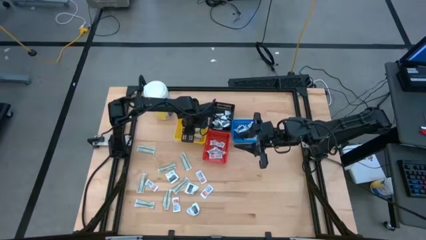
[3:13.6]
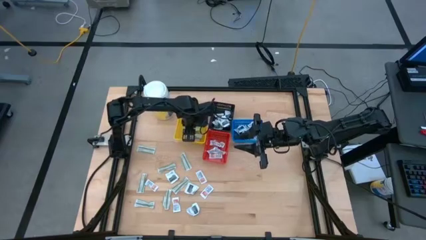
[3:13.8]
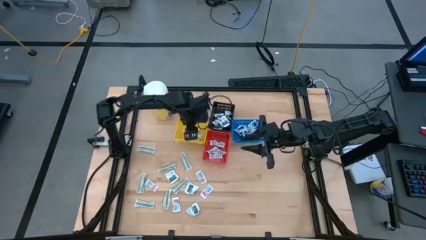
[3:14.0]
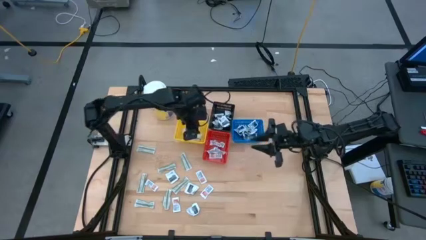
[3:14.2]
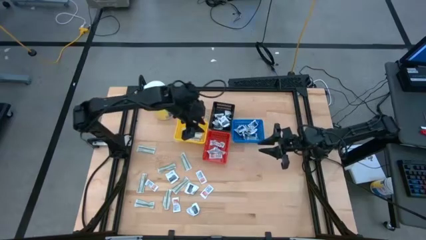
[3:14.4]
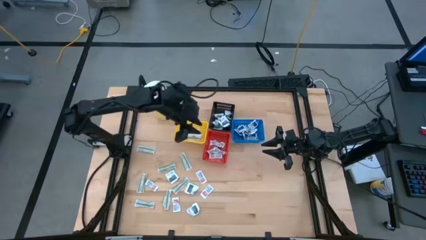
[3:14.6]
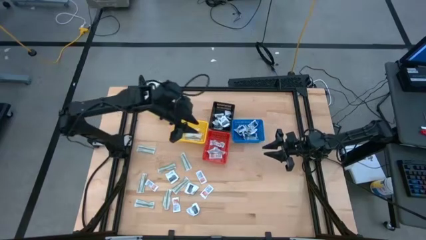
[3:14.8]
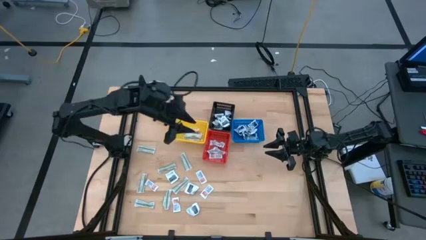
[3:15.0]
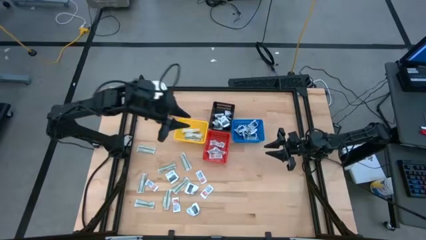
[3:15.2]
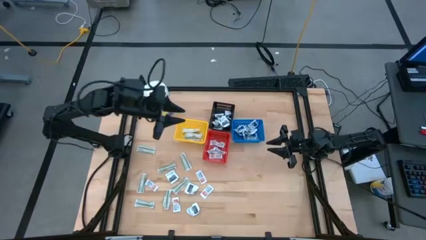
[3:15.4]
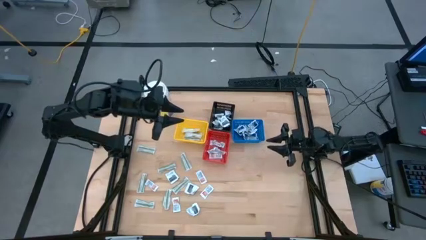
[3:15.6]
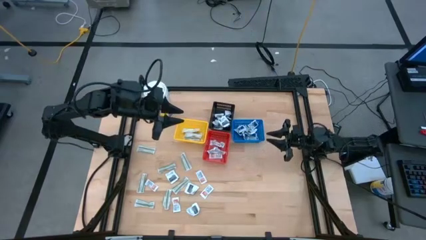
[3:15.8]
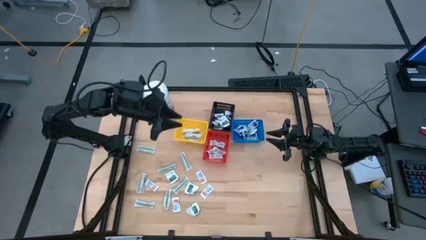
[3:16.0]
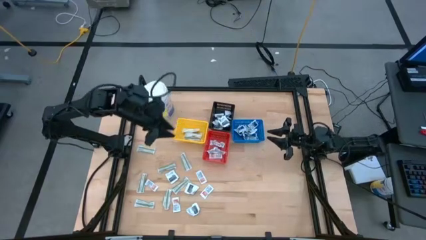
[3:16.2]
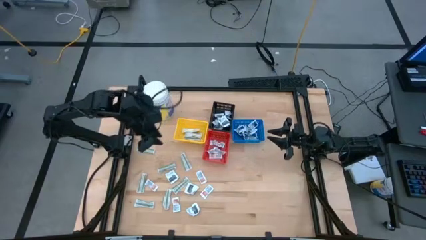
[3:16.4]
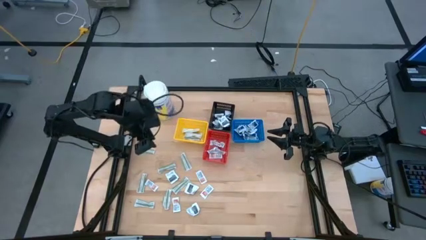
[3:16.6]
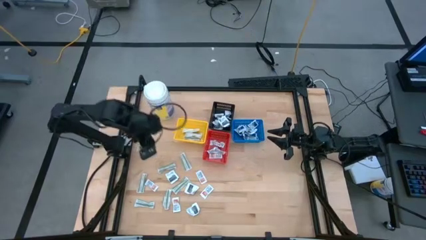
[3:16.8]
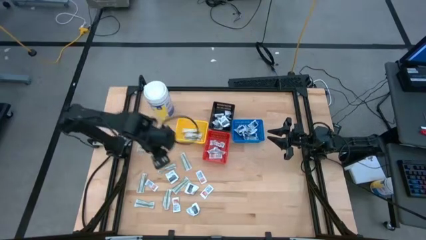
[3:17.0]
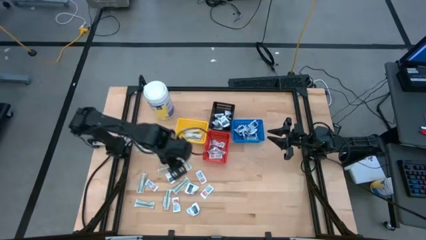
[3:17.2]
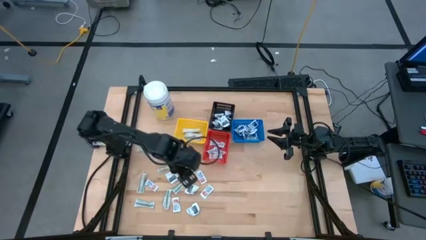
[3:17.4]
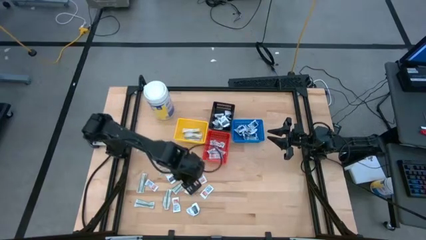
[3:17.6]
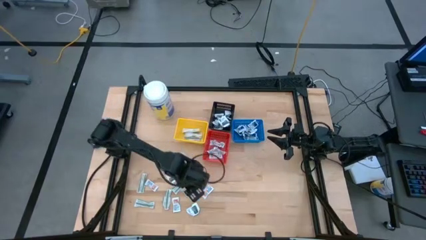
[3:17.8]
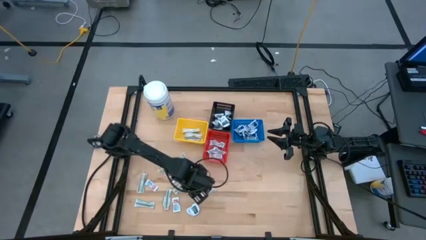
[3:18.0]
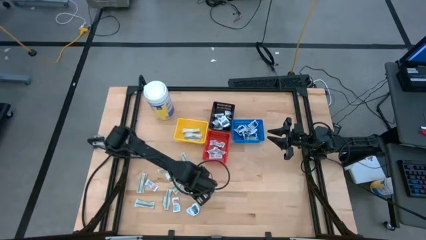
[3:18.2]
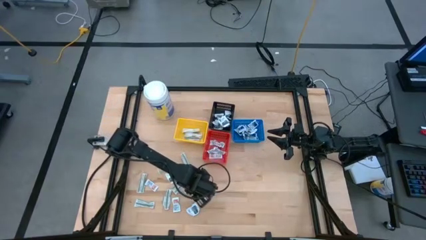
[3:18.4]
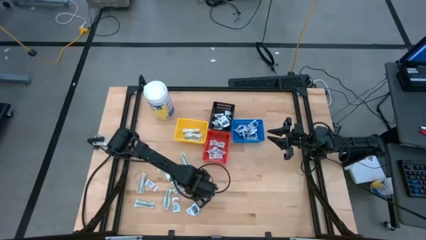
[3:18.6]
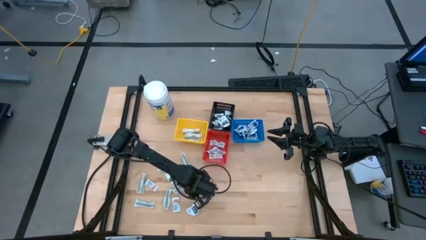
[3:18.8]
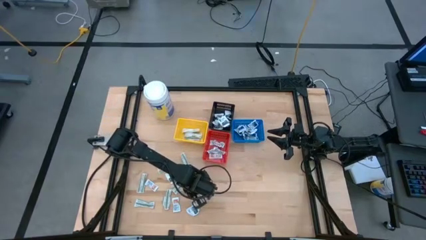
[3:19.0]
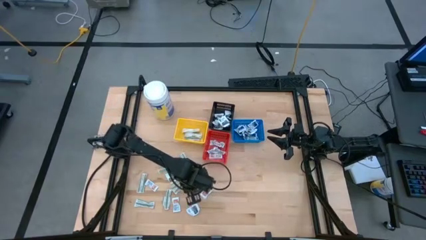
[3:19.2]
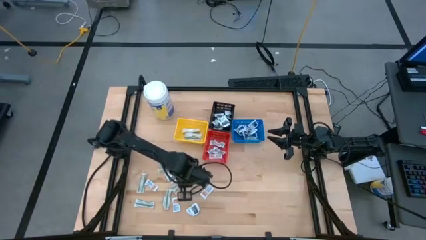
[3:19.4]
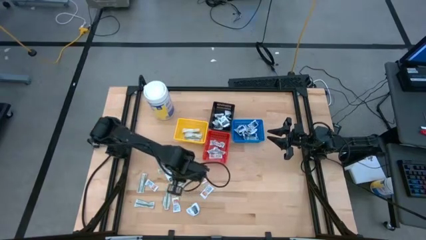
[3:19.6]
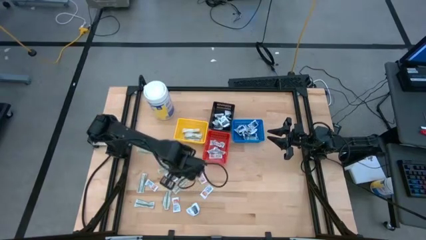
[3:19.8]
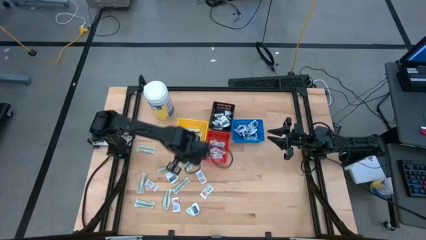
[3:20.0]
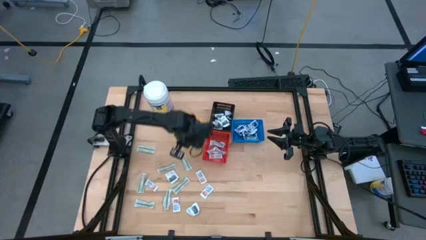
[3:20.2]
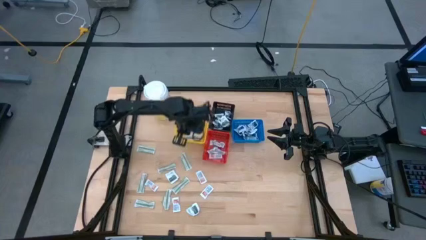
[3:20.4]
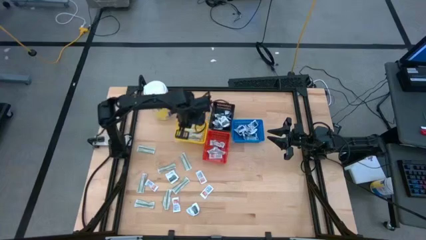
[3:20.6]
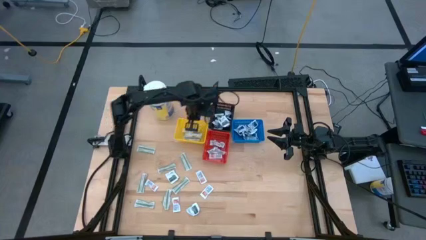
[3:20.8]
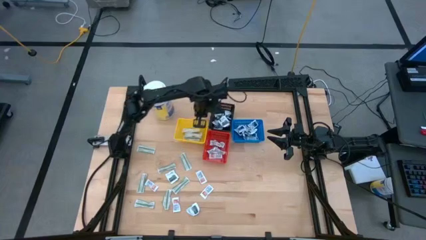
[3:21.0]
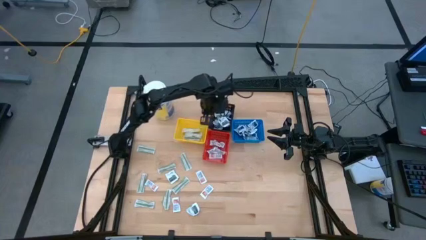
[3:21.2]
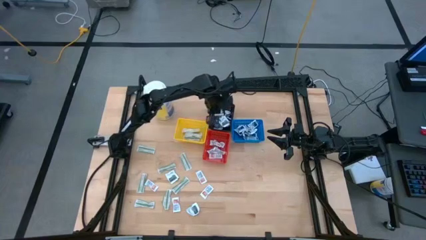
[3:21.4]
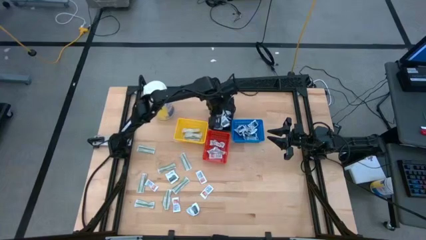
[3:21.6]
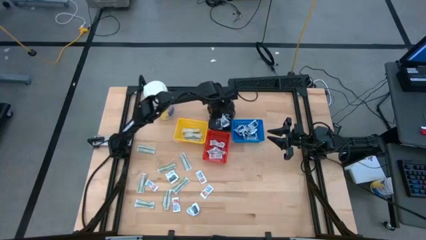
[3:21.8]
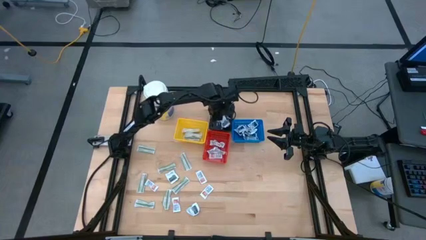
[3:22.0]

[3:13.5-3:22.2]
Task: Pick & Place First Aid Supplies
Put the towelette pack into the black bin

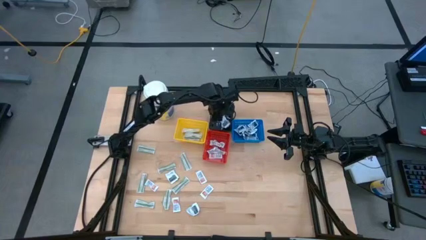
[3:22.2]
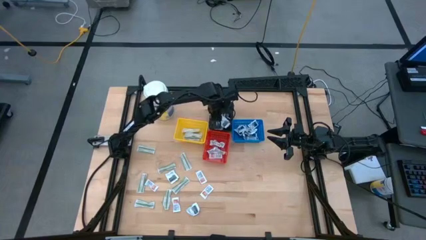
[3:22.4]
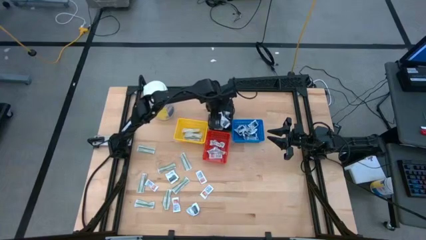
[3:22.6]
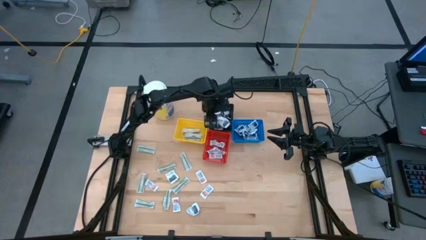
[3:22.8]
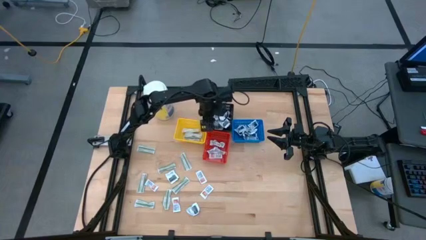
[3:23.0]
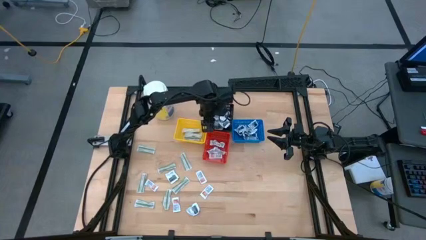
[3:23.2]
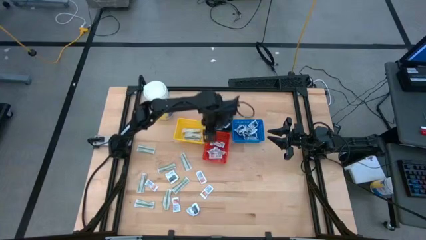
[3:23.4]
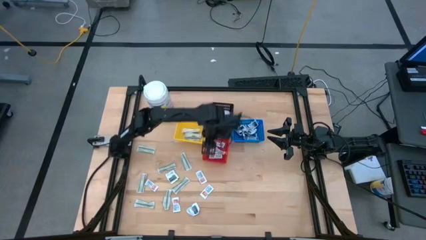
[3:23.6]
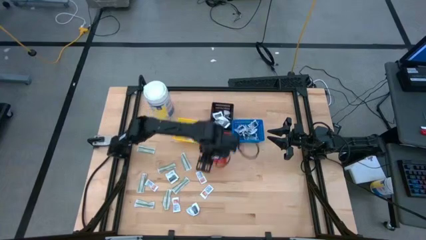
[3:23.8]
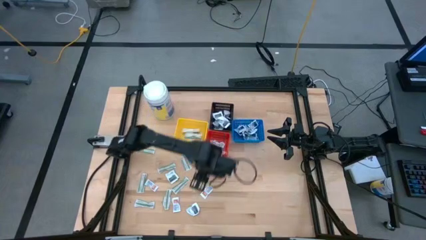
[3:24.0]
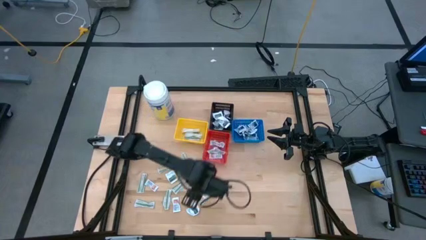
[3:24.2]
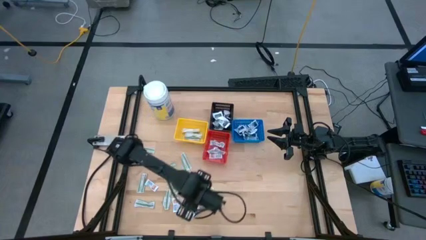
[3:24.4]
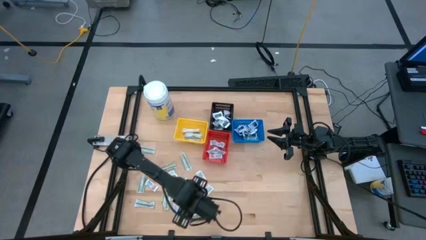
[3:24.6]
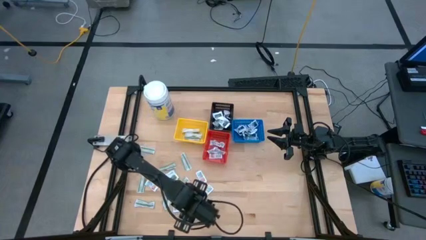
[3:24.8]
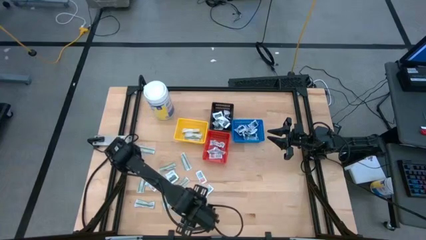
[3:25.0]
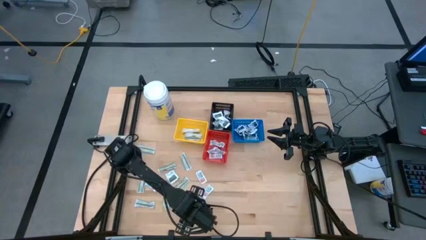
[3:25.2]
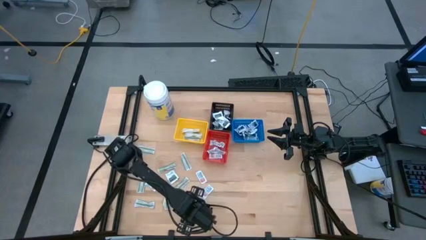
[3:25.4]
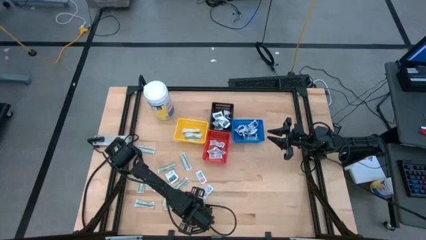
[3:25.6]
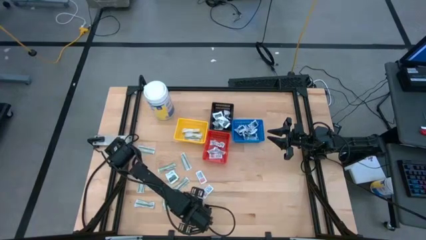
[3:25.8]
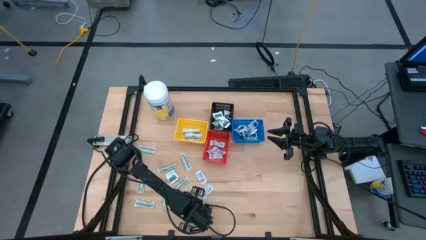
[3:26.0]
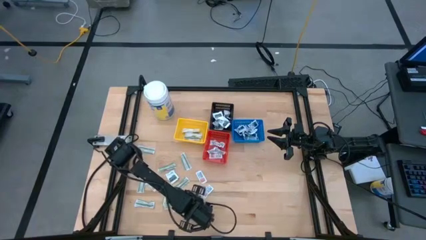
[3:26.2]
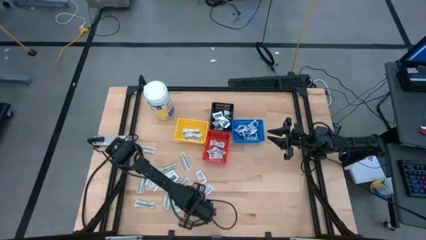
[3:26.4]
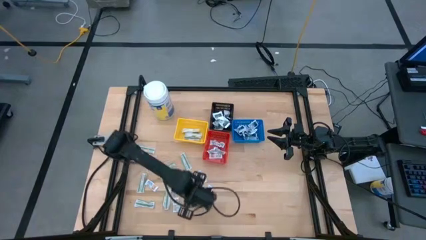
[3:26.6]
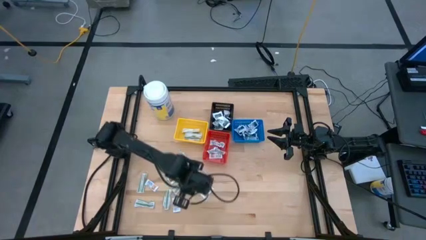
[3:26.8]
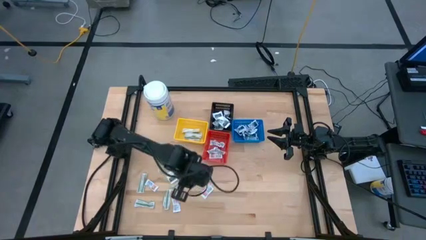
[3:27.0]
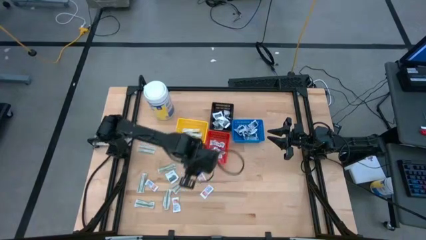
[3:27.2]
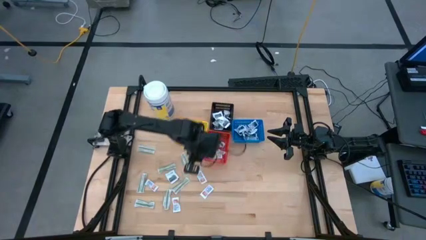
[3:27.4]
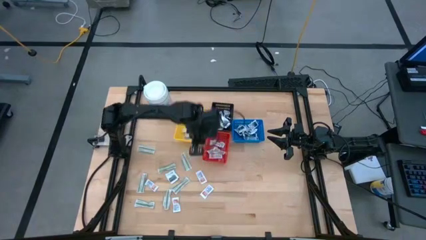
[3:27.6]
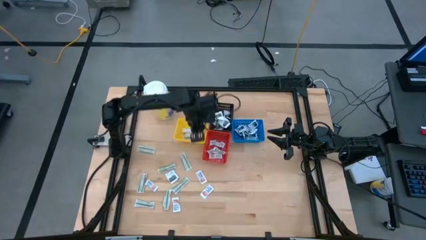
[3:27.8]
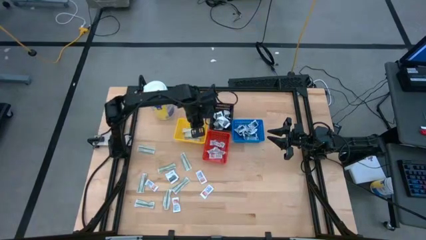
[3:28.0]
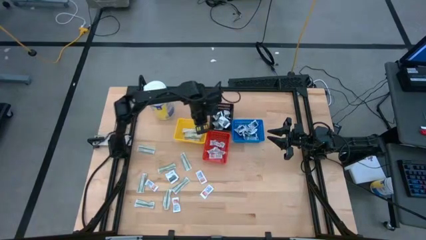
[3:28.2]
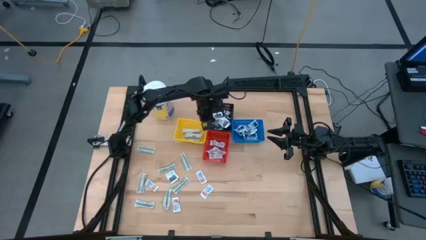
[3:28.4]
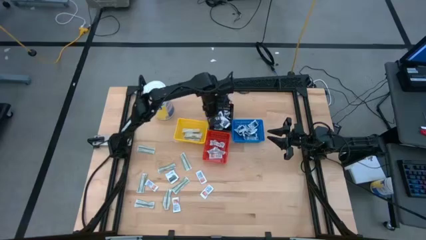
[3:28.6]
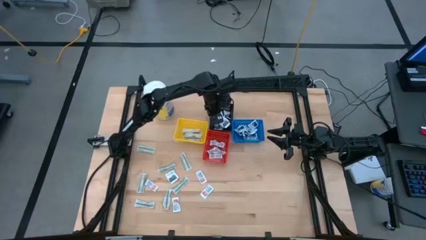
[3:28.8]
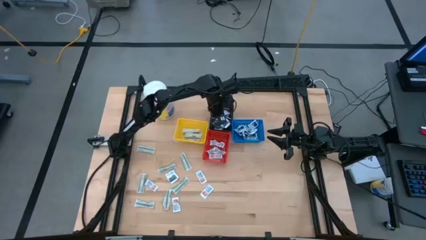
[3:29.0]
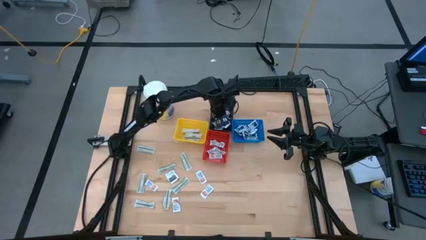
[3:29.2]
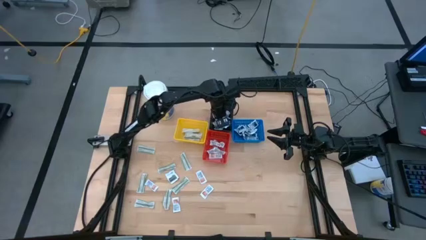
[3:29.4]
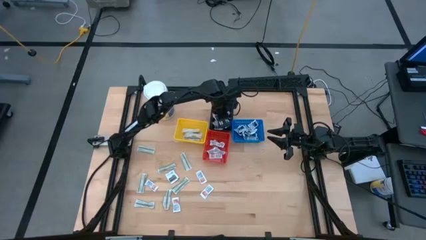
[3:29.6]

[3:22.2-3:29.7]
Put the towelette pack into the black bin
